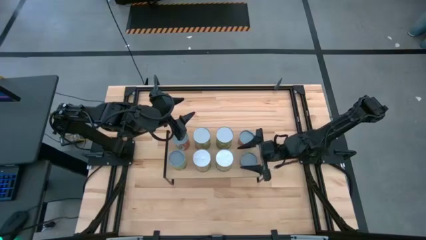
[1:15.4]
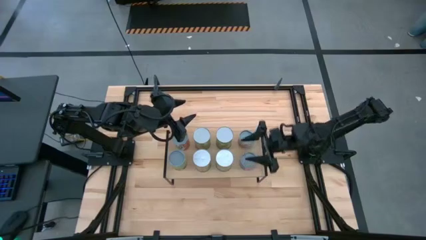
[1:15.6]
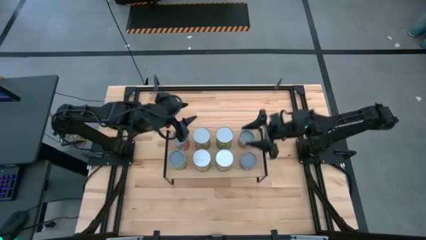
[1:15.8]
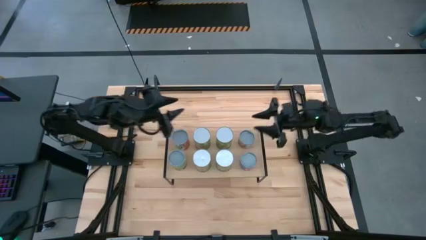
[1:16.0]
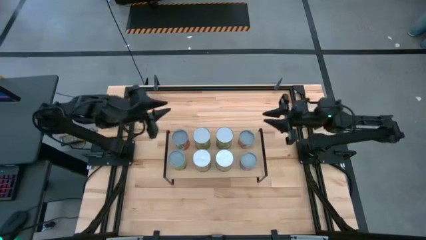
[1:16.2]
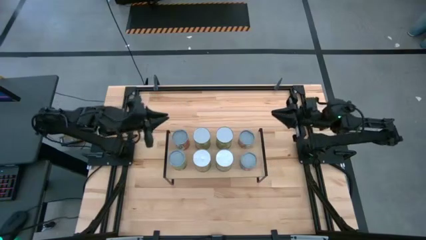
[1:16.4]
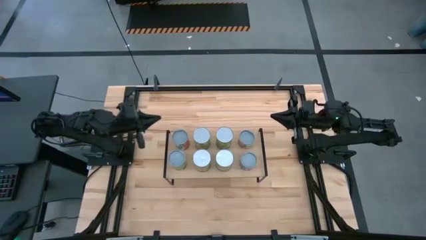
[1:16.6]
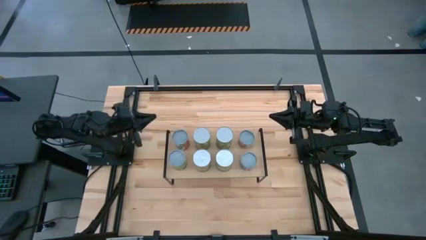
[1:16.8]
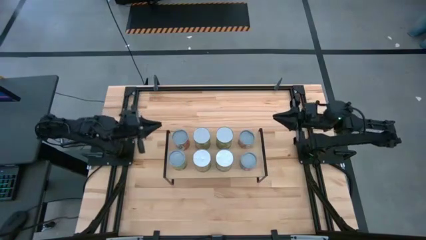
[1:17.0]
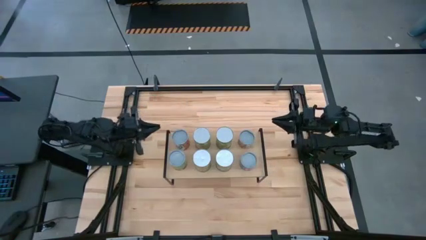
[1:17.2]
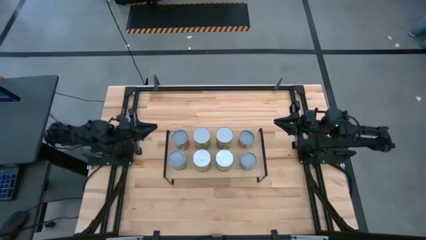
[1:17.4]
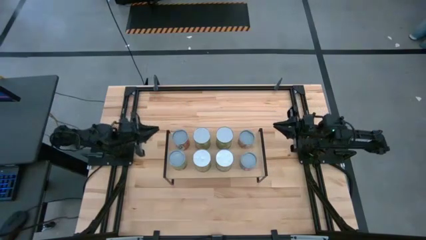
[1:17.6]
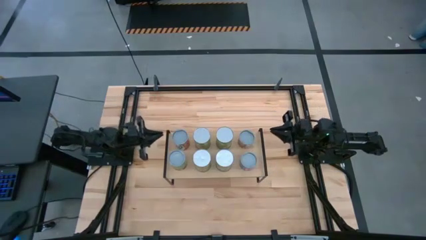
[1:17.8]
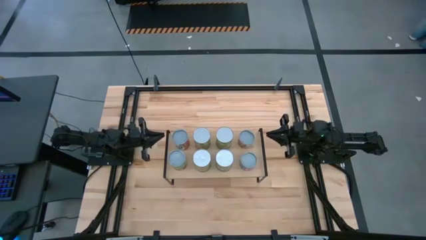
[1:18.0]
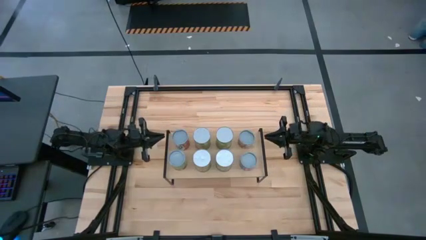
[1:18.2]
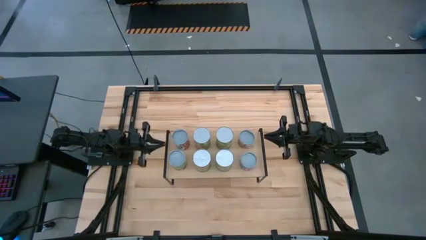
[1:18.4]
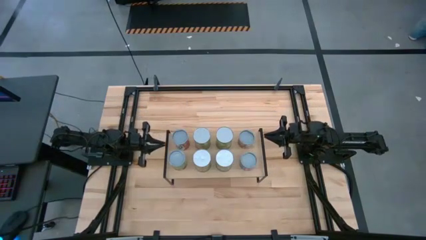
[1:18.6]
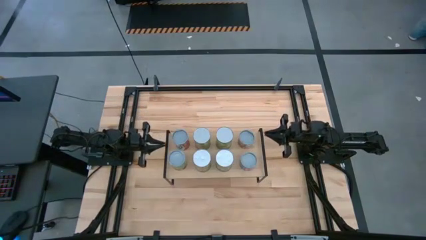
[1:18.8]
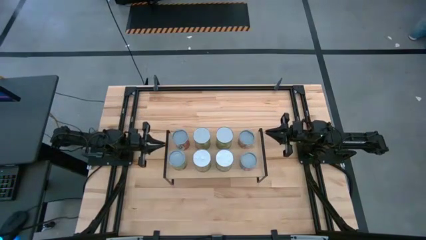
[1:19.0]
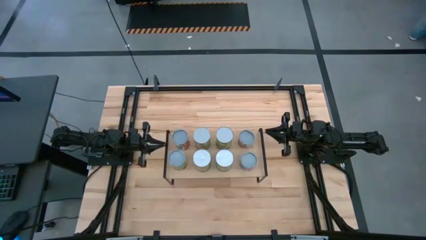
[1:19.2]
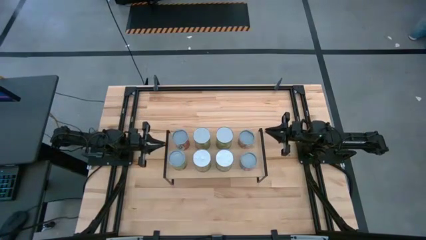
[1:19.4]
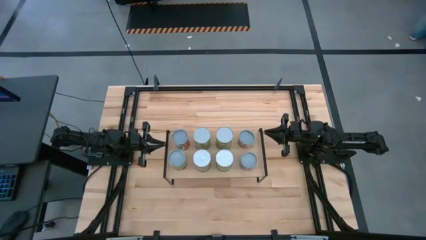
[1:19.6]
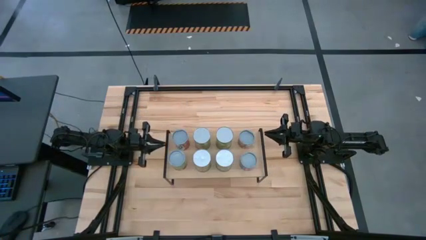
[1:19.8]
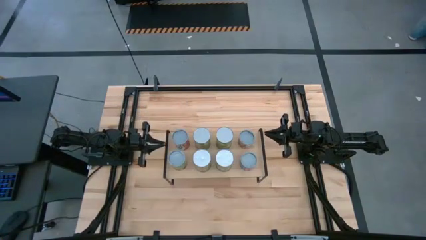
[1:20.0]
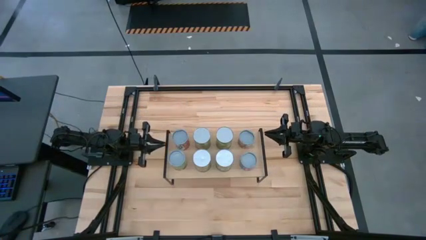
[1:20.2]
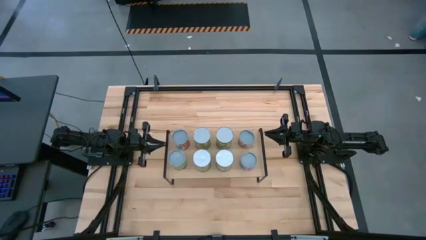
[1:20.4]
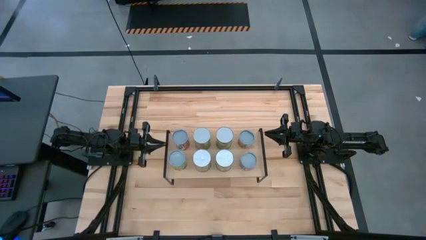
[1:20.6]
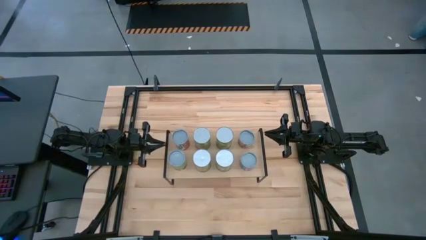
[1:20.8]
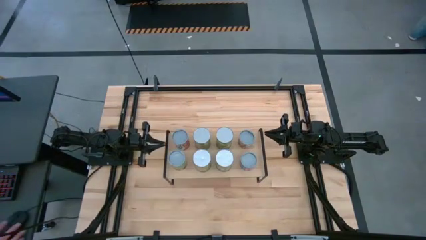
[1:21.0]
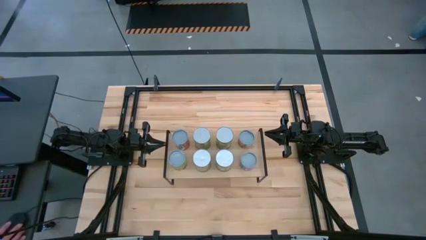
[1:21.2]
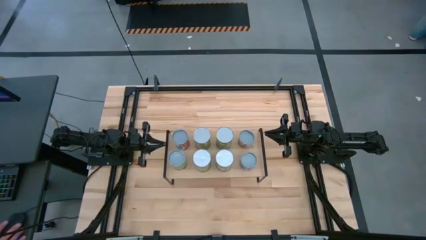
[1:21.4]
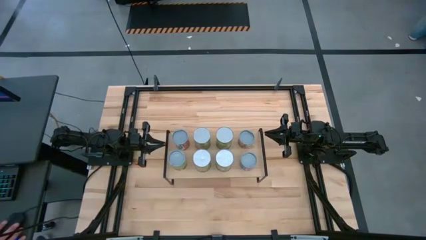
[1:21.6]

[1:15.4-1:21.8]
Task: Pick and place cans onto a shelf
Return to Home Position

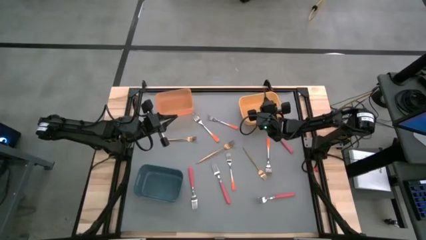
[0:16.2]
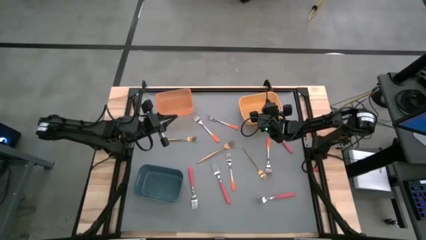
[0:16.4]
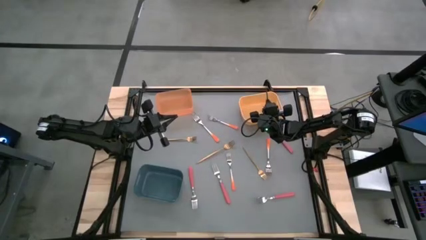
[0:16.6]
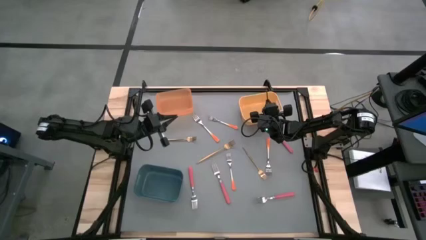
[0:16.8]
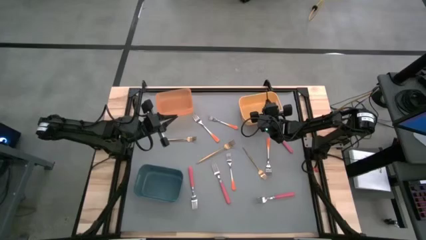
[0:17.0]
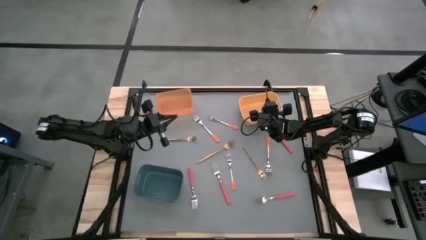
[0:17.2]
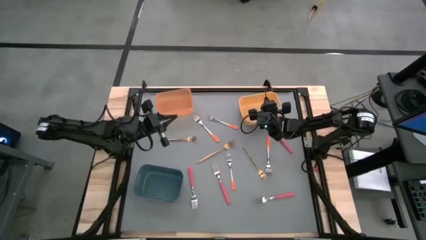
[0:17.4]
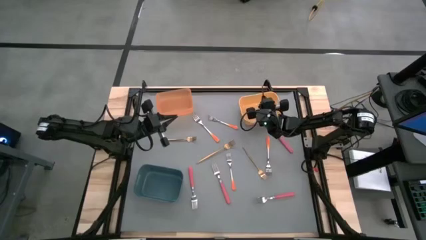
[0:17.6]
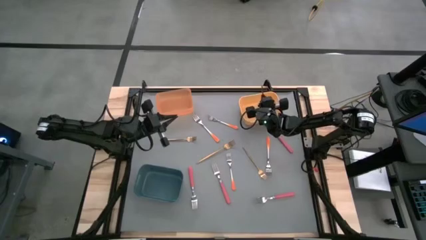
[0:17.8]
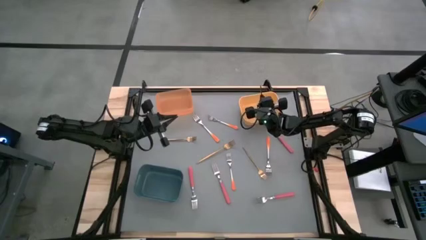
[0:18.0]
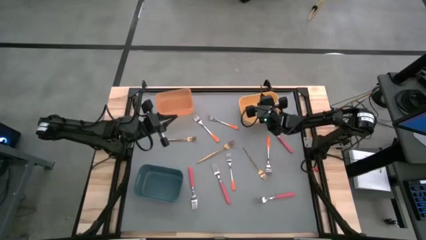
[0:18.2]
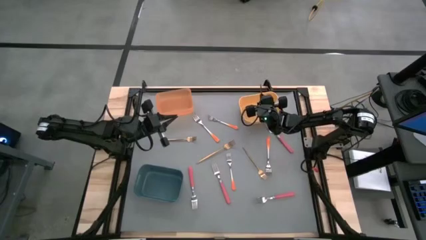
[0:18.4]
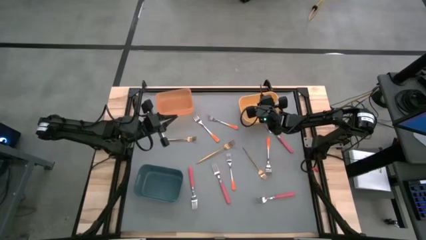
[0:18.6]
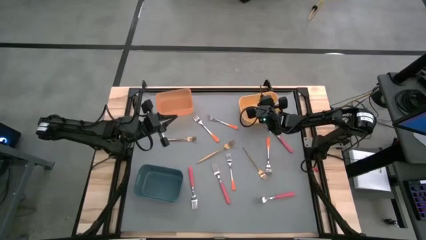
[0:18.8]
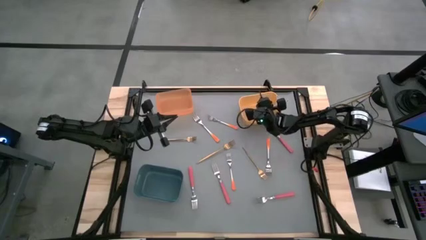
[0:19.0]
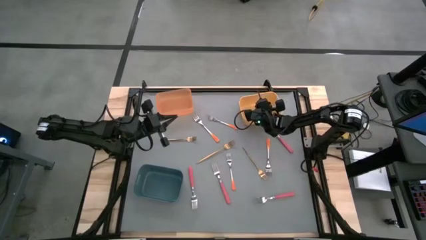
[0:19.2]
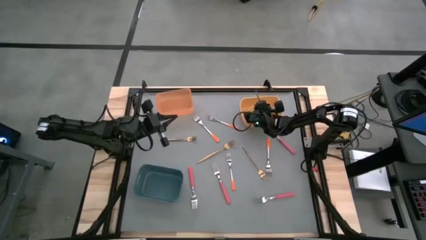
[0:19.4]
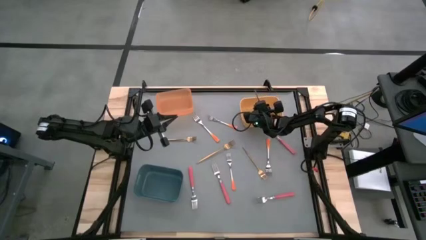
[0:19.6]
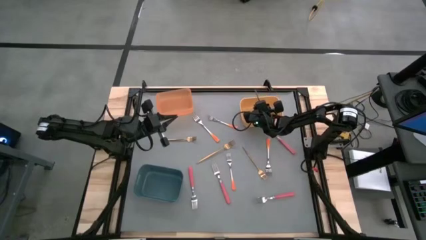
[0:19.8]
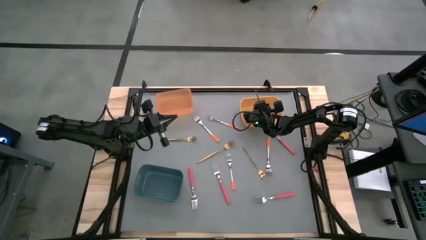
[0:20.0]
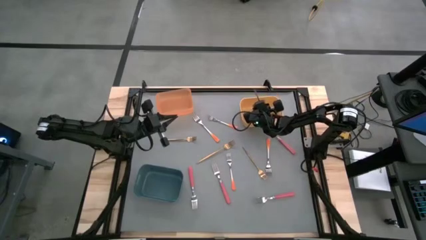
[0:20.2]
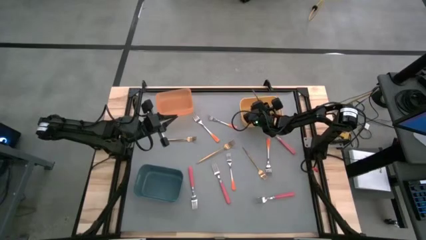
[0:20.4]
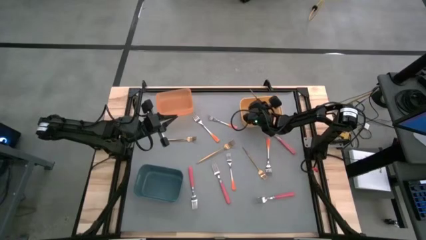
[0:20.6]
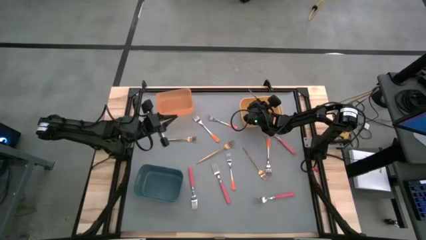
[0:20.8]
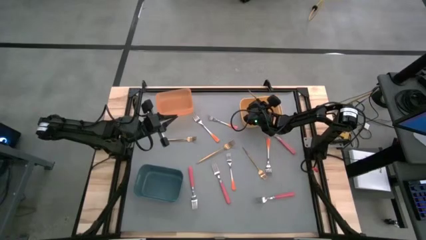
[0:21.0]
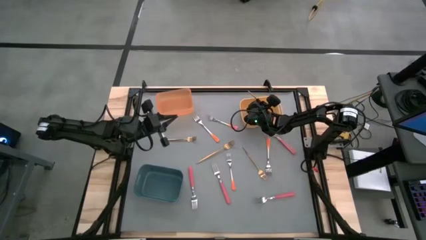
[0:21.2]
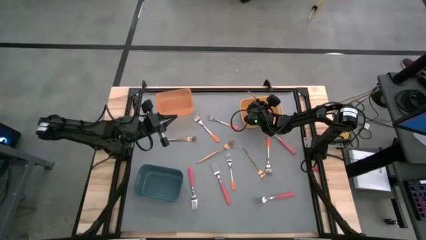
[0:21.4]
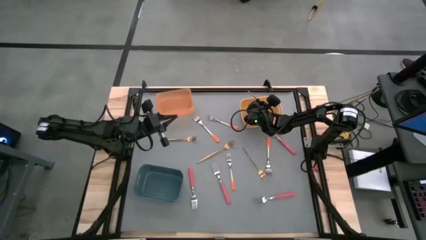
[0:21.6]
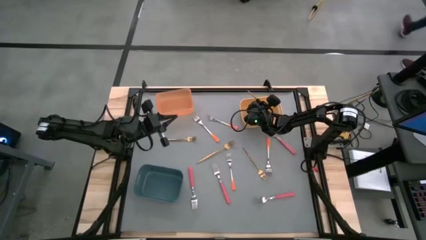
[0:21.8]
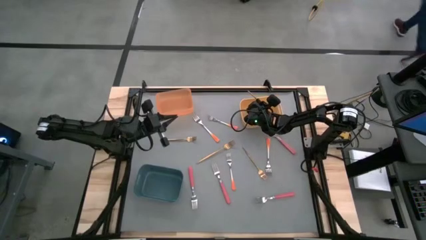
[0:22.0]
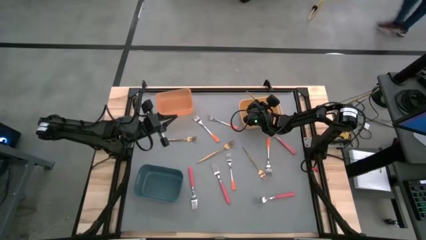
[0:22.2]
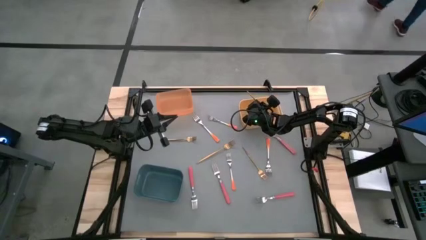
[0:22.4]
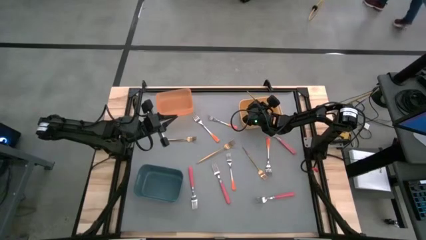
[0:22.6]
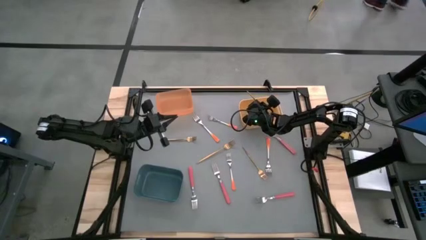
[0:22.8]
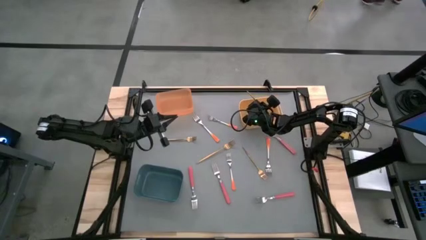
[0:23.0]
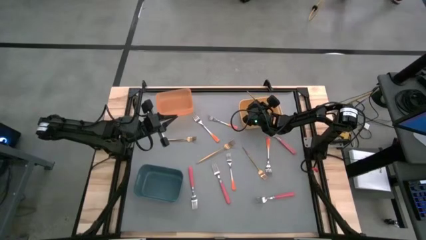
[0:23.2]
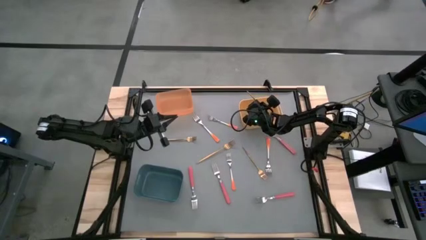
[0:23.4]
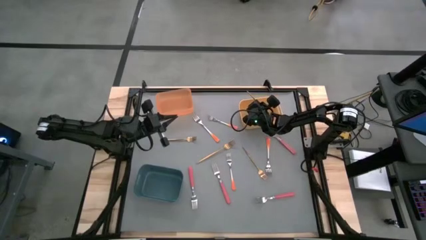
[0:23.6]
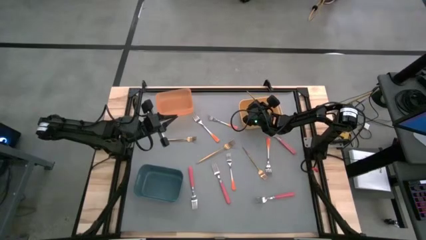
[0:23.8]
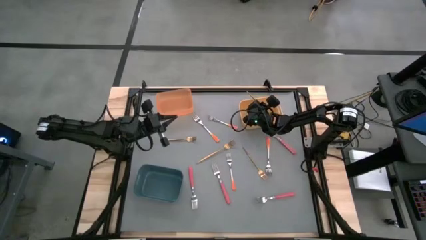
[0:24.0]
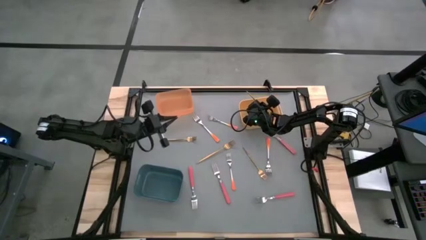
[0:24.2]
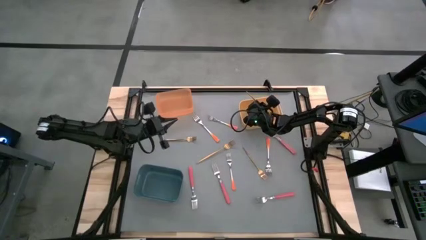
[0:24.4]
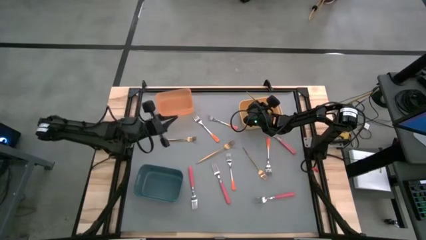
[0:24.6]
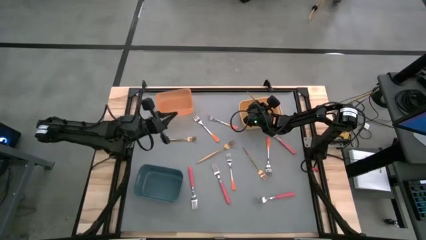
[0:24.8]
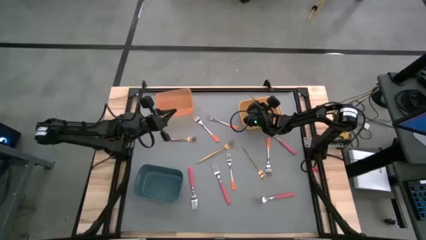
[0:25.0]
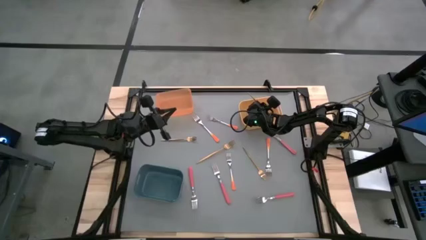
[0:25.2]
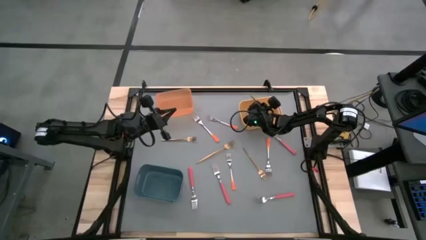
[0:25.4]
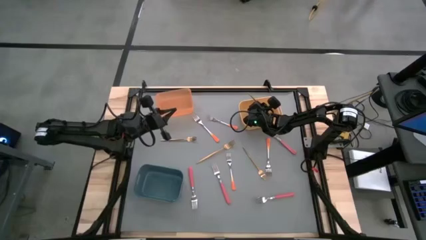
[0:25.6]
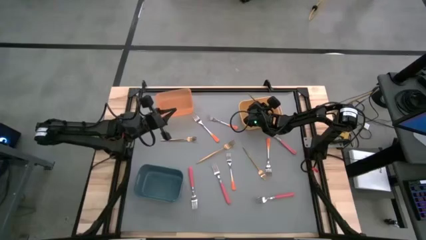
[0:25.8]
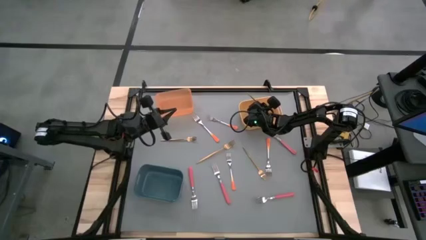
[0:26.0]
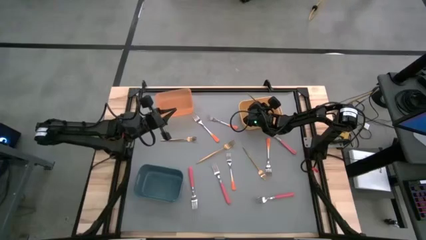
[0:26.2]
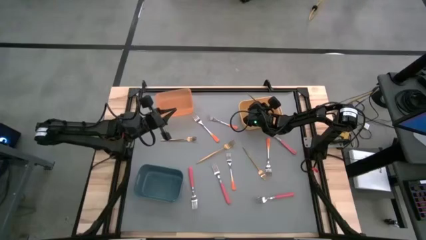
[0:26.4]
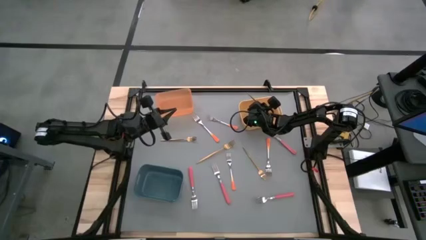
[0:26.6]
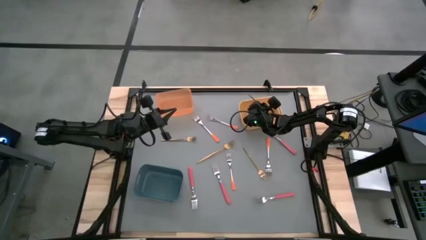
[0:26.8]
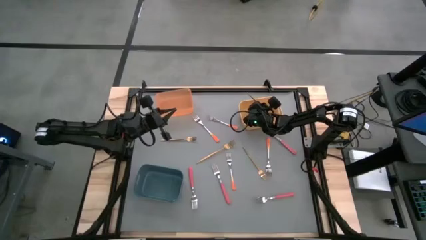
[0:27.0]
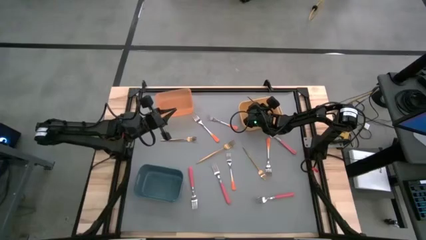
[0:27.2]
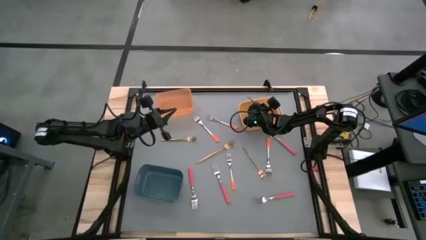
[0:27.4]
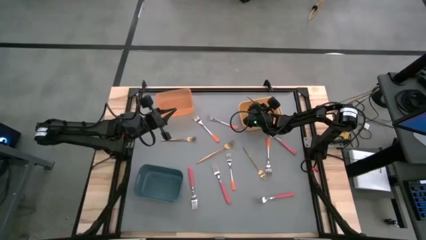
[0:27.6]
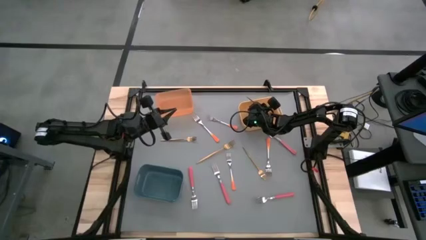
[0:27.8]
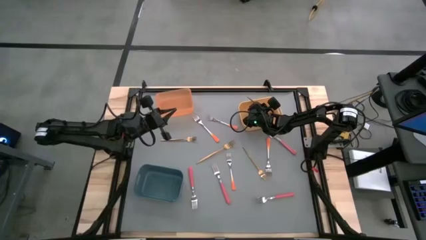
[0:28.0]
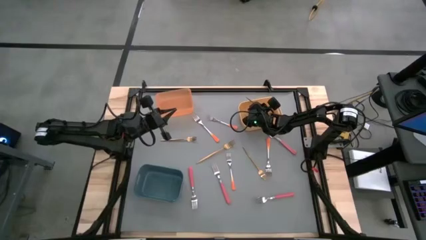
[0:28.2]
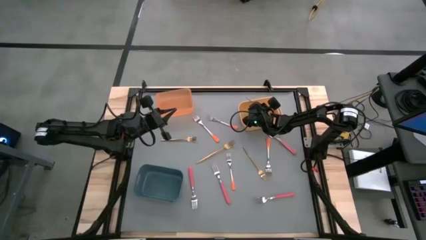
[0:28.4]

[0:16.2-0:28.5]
Task: Sort silverware by color (type)
Put the gold fork into the yellow bin
